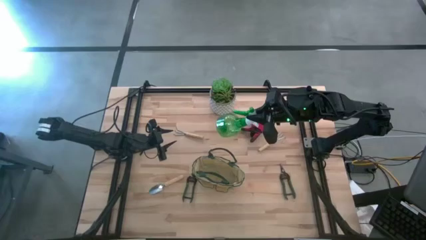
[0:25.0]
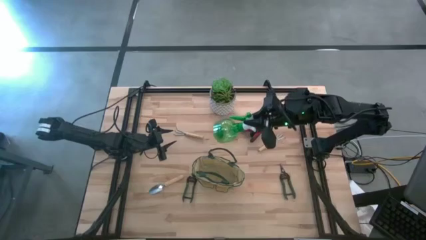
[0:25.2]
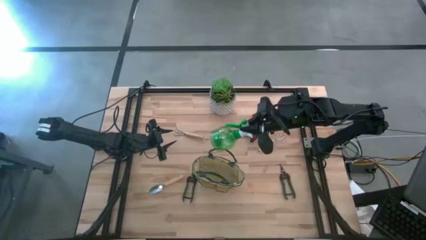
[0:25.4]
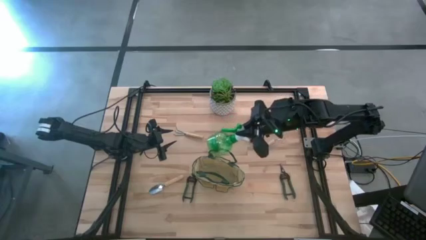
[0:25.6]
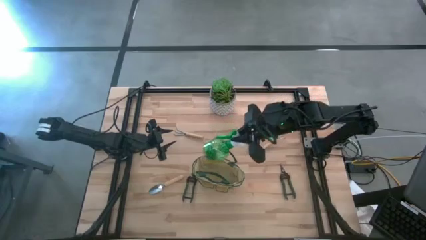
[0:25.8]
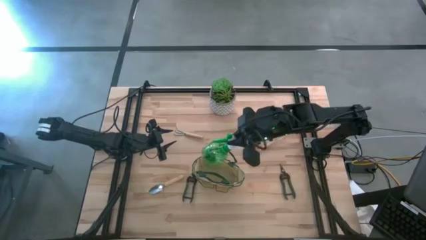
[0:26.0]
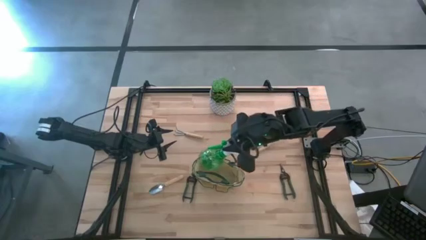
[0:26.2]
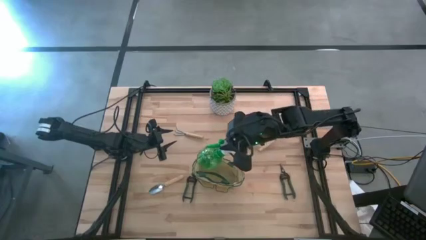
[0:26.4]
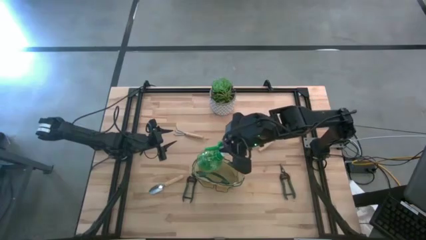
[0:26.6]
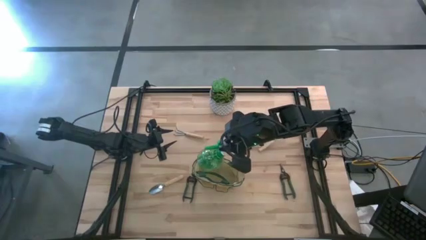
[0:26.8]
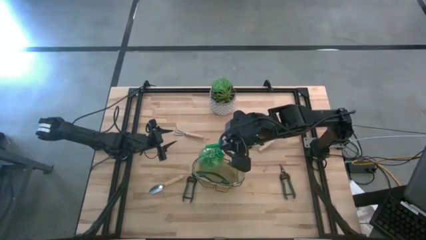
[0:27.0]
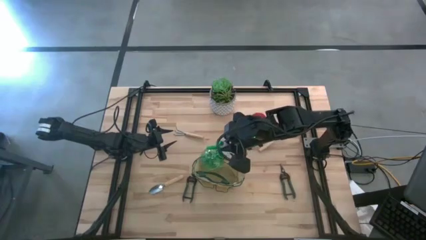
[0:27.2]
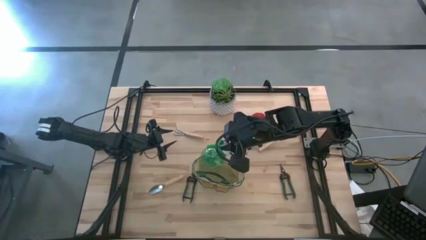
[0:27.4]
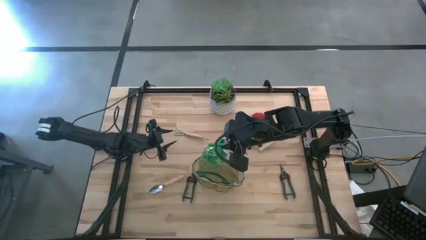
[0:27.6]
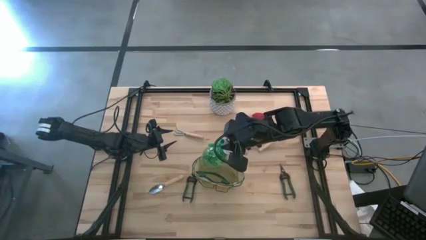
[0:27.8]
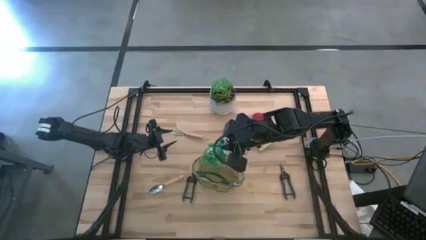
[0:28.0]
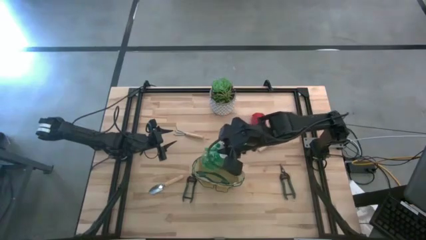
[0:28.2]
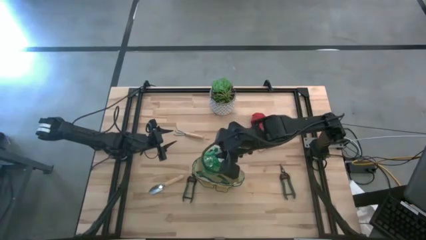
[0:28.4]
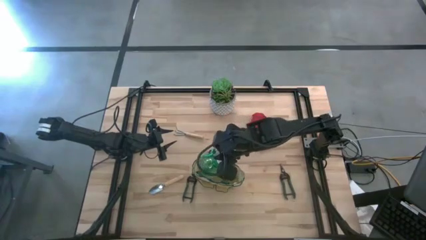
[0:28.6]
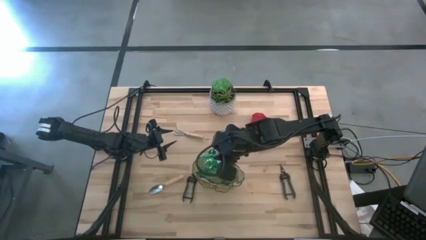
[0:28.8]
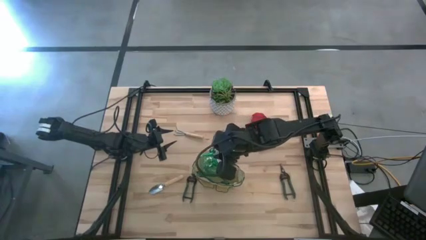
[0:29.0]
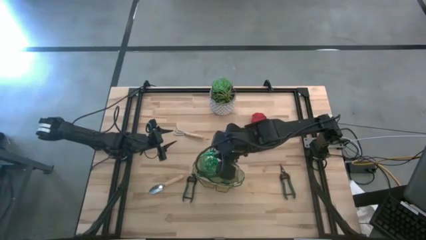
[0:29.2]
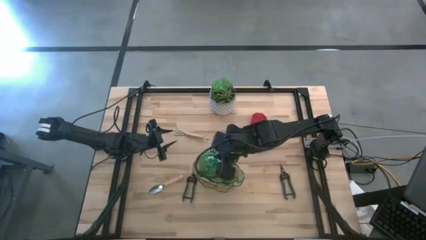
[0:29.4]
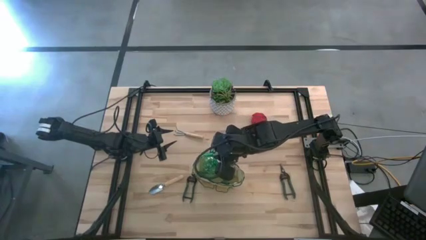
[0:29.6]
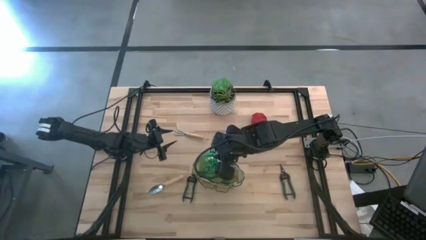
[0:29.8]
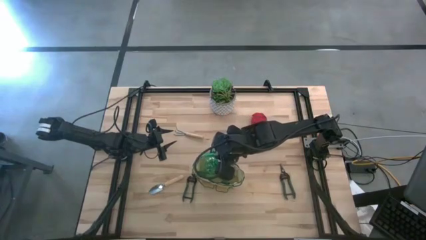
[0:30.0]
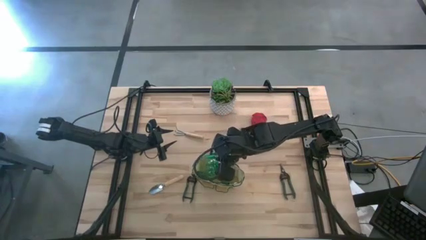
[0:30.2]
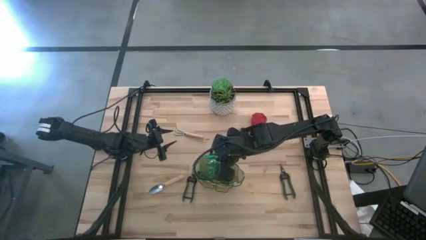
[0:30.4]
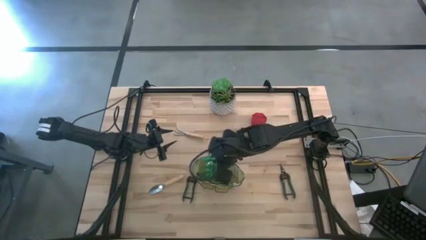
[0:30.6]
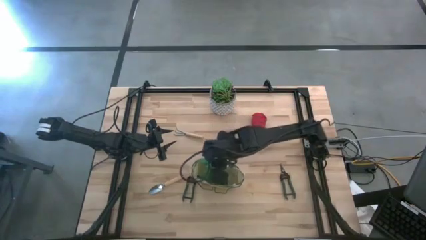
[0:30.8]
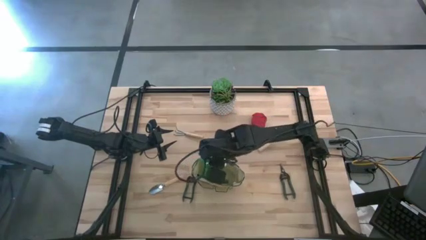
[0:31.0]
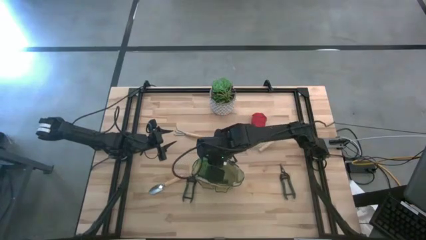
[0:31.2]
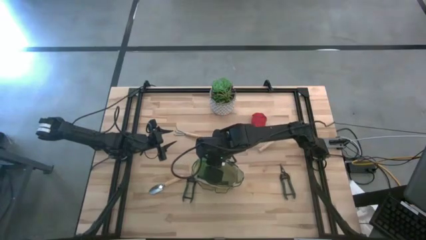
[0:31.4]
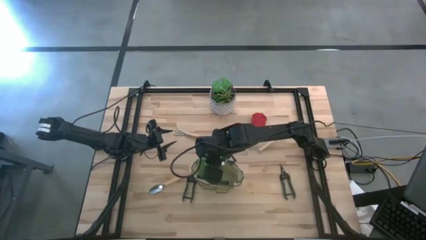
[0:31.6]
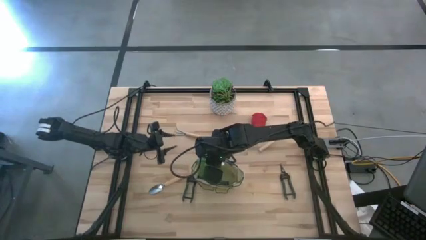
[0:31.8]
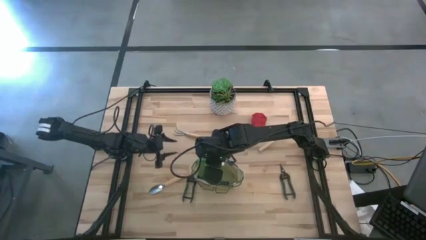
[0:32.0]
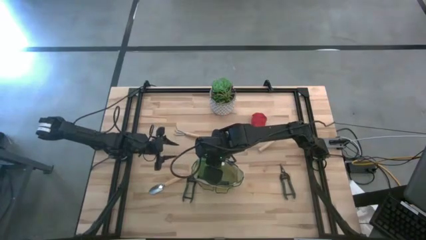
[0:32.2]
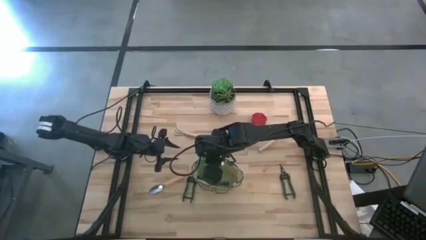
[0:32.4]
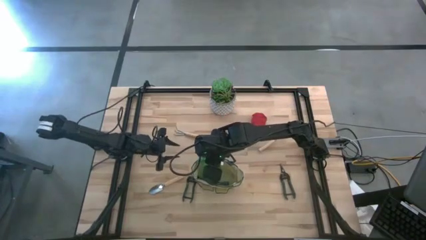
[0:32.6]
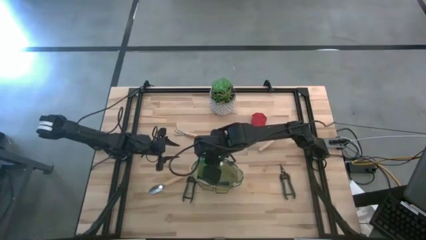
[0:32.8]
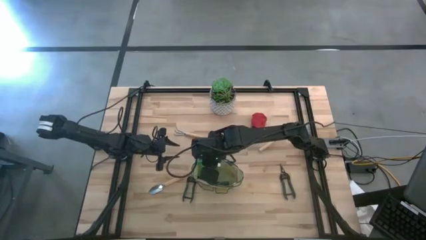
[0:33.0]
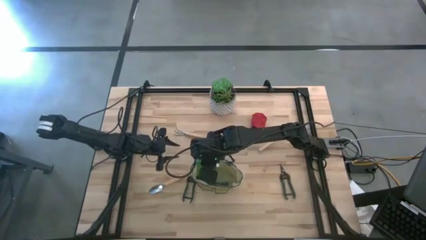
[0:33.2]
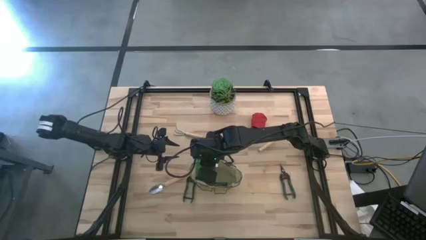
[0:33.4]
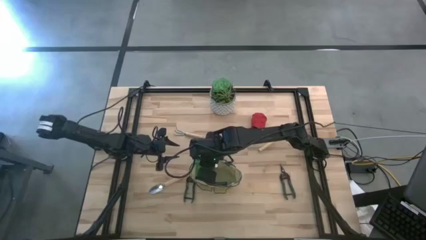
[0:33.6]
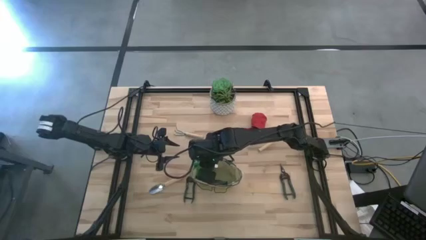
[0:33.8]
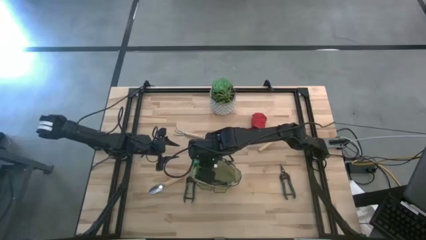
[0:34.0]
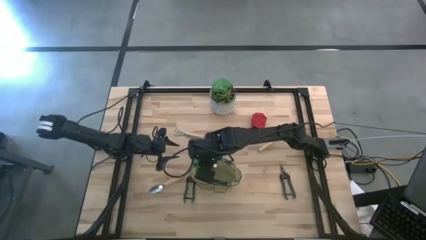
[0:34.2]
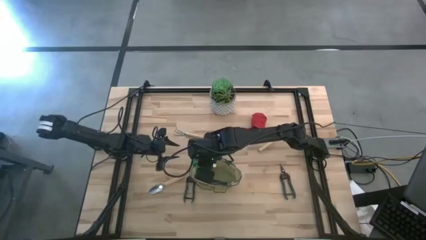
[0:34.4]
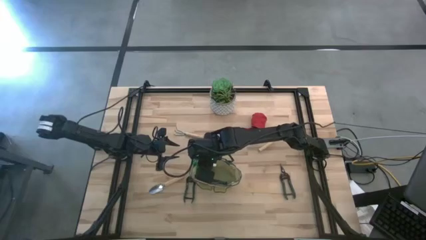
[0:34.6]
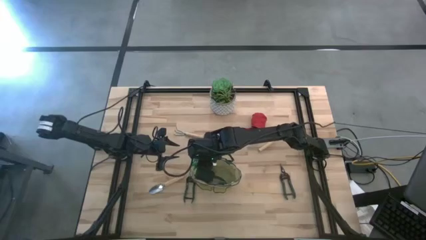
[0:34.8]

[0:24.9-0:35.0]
Task: Pick & Place Garden tools in Gardening bag
Put the green spray bottle into the white gardening bag

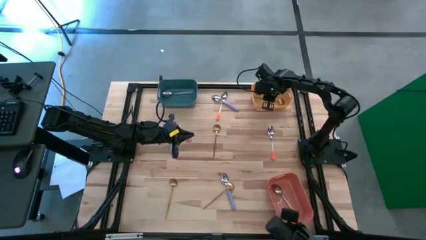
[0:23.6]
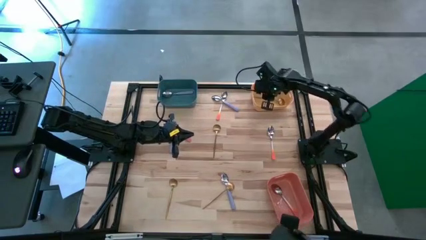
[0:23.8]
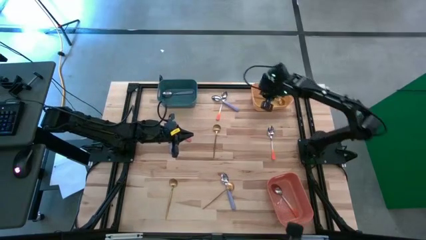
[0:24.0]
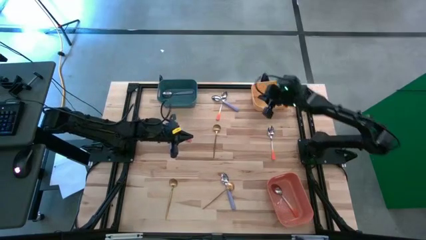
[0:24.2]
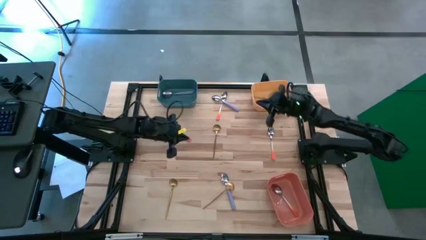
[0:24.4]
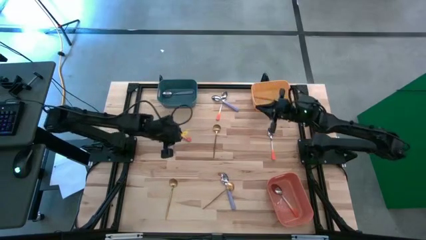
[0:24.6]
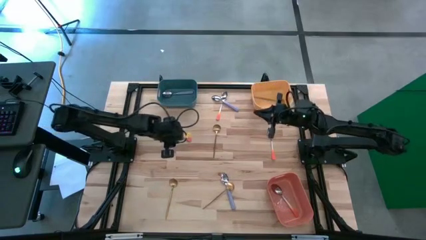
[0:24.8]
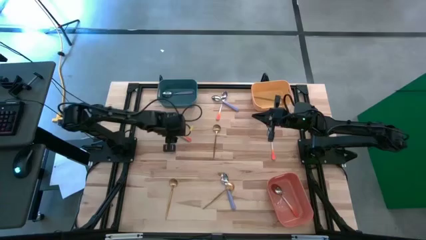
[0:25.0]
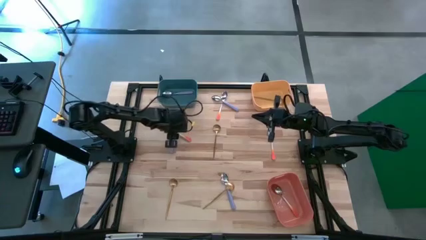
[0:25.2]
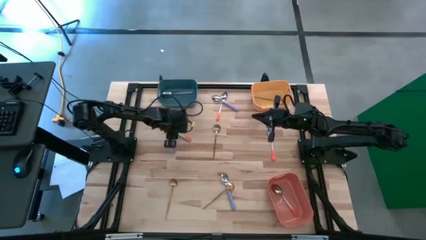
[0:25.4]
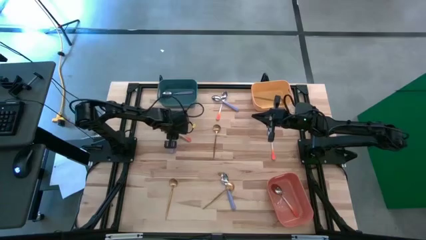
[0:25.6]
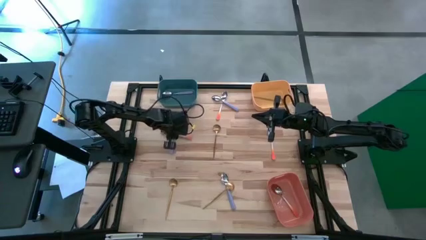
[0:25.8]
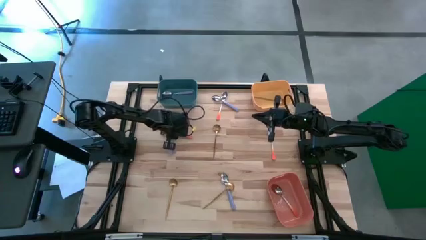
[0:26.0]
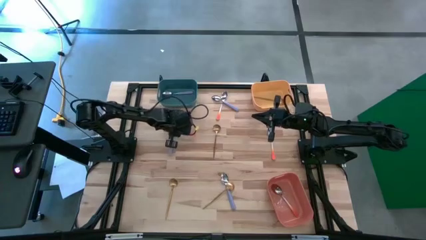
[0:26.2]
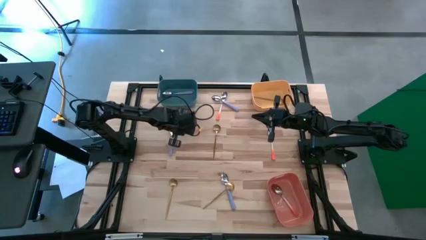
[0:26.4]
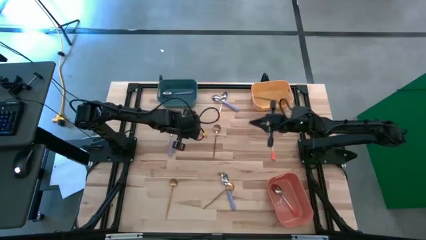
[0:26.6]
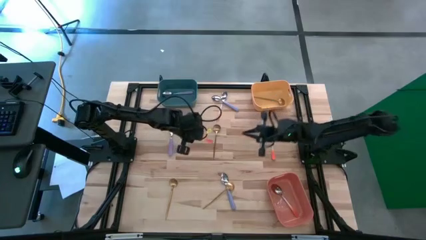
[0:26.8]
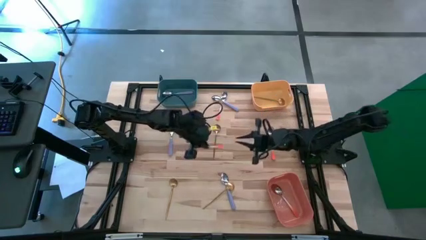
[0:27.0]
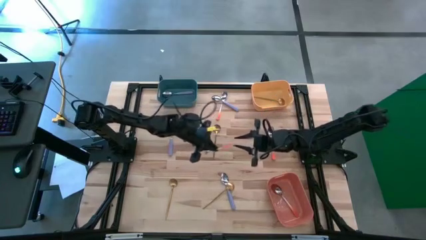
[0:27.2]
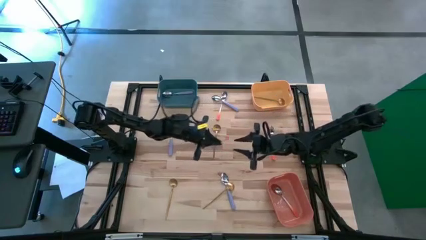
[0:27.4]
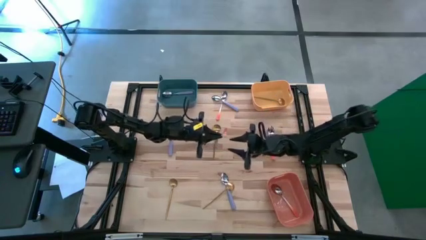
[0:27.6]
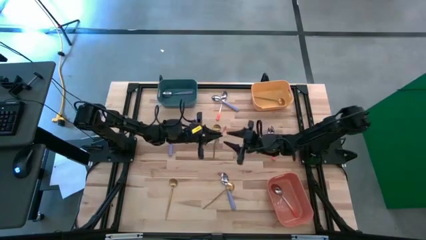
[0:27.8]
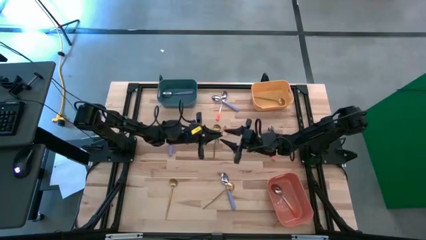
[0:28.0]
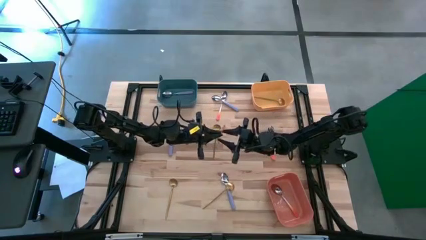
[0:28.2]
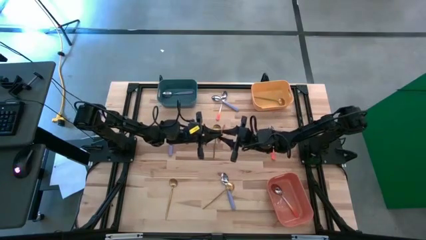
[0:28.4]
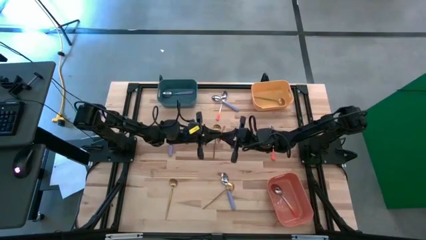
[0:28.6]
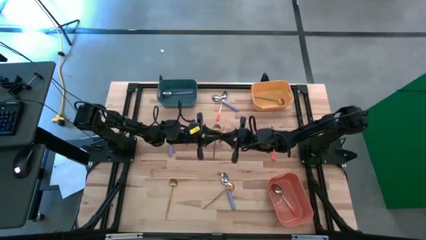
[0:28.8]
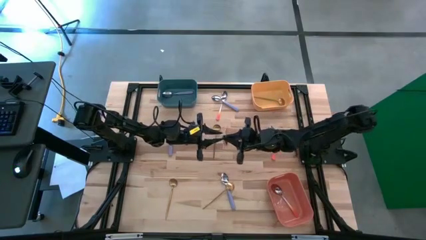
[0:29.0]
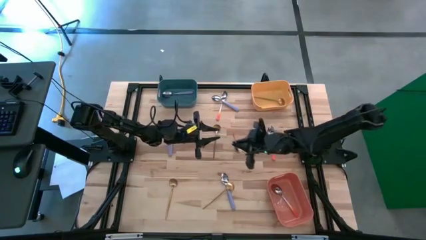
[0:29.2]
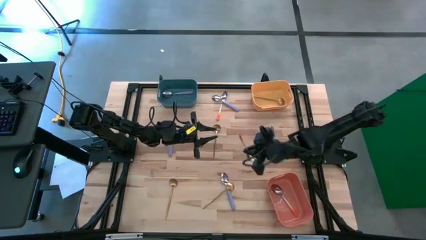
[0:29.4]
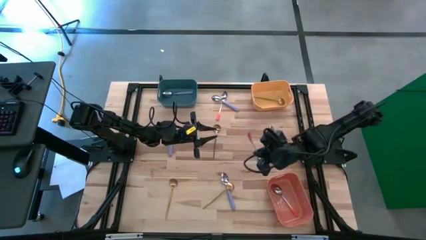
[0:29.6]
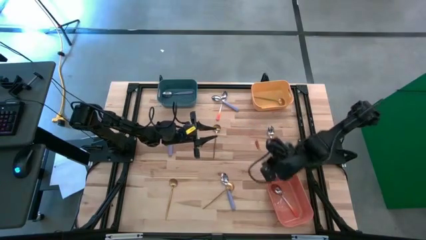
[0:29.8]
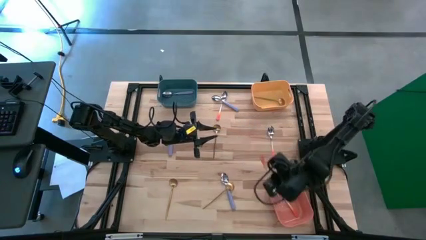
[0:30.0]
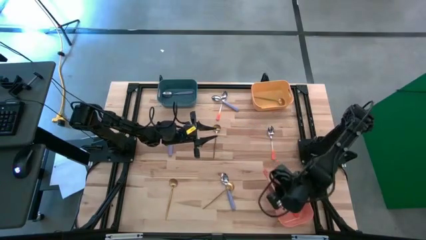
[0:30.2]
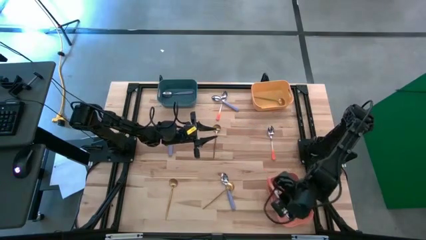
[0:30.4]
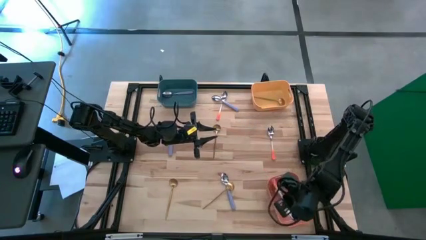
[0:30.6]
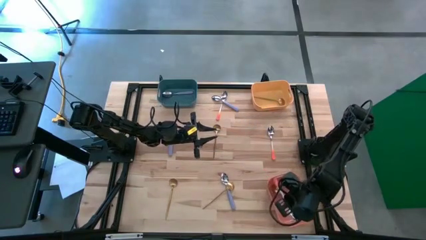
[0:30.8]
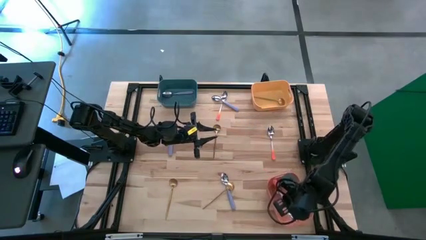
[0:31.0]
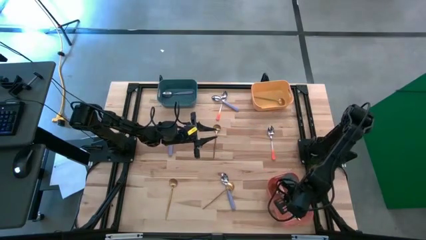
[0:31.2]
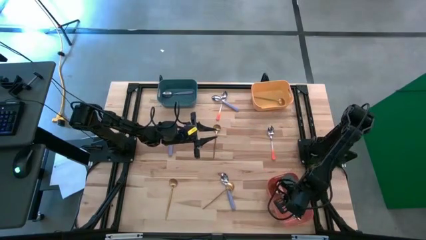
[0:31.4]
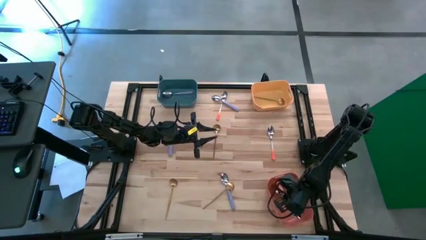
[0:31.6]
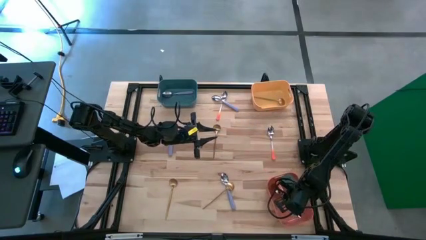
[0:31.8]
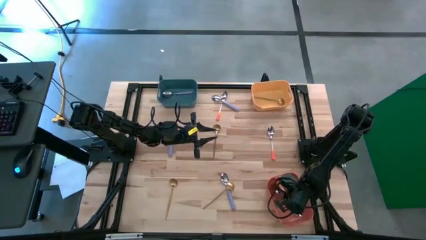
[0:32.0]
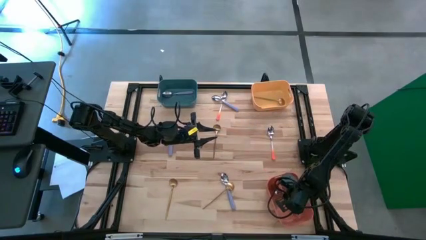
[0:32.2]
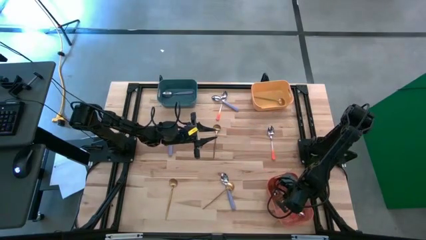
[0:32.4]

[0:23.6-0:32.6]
Task: Sort silverware by color (type)
Put the bottom left orange spoon into the orange bin
